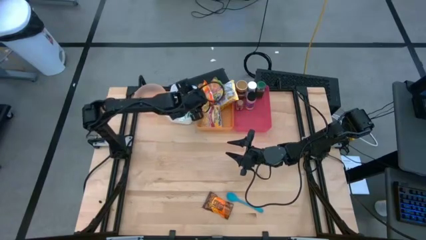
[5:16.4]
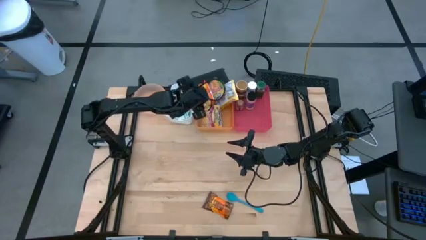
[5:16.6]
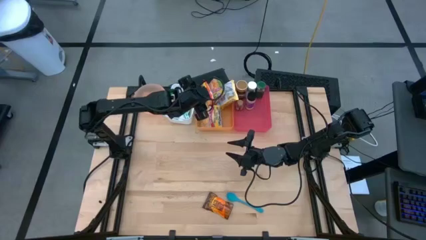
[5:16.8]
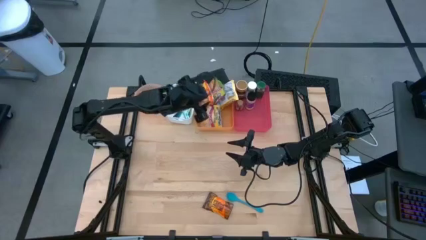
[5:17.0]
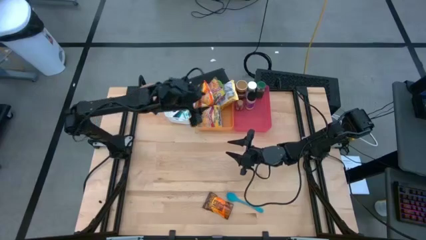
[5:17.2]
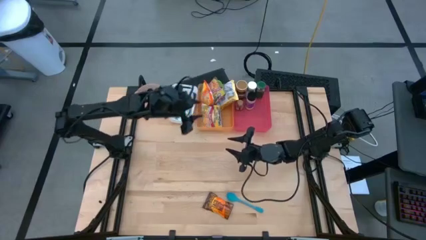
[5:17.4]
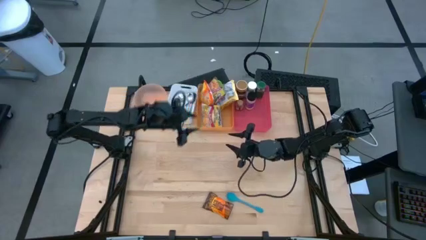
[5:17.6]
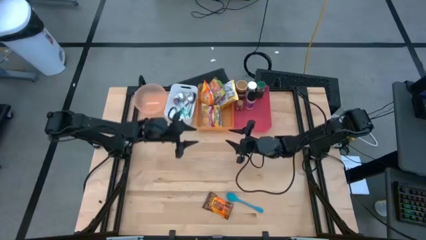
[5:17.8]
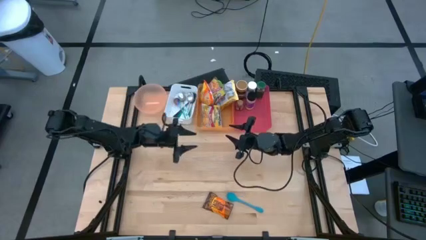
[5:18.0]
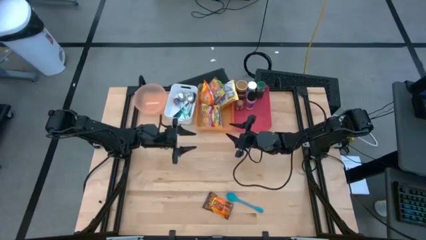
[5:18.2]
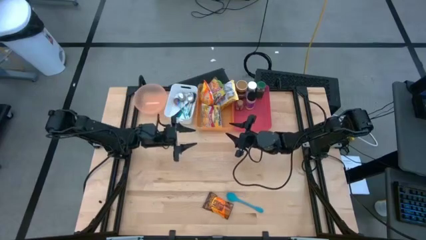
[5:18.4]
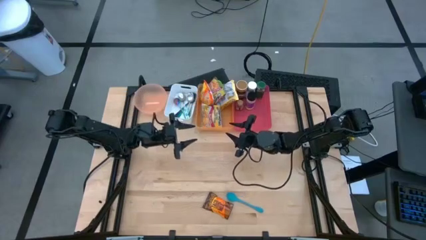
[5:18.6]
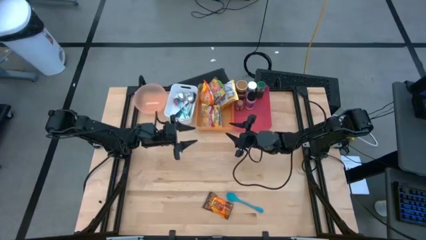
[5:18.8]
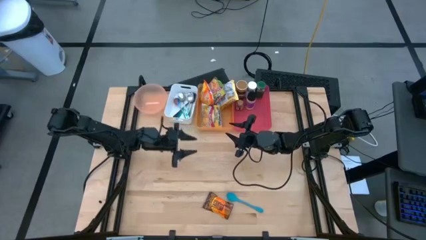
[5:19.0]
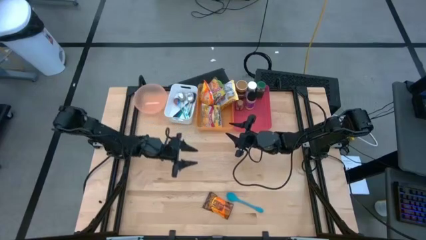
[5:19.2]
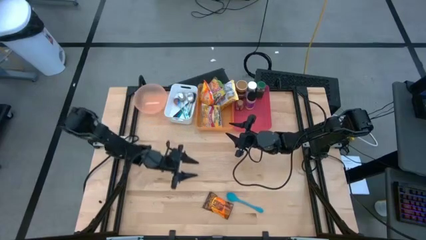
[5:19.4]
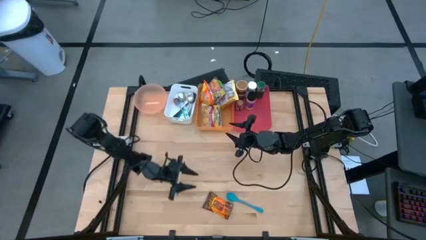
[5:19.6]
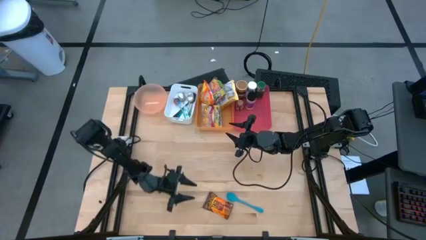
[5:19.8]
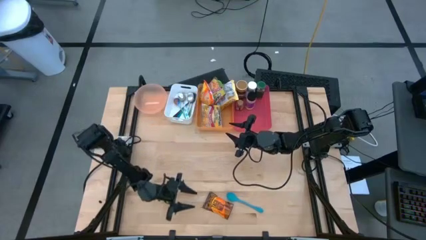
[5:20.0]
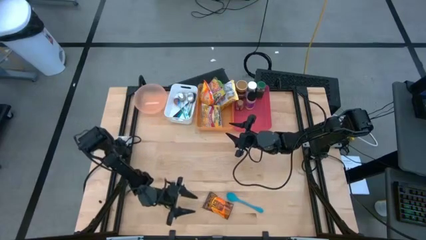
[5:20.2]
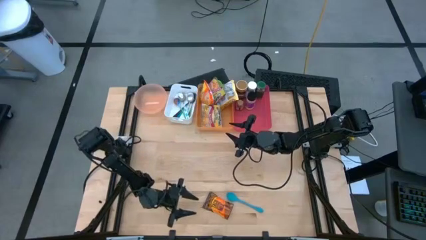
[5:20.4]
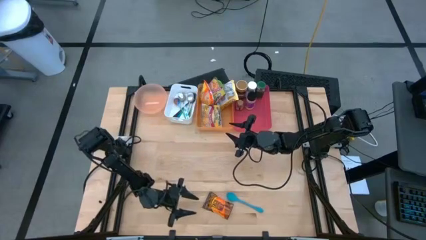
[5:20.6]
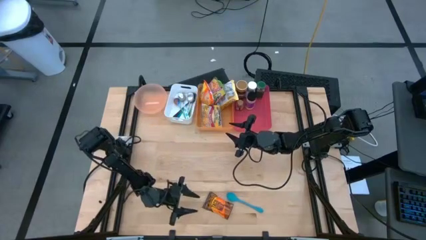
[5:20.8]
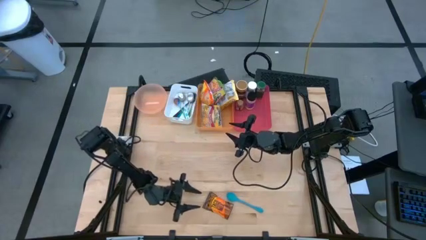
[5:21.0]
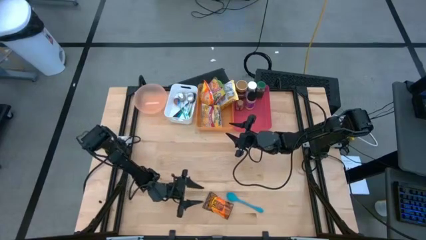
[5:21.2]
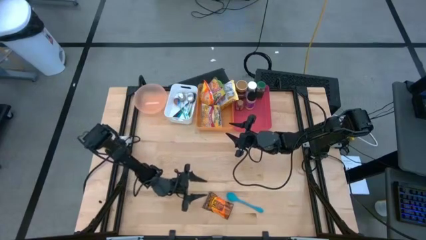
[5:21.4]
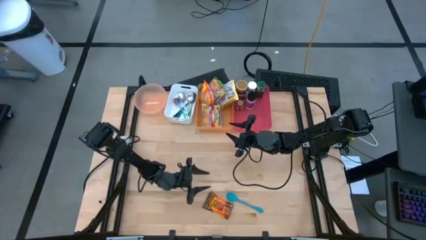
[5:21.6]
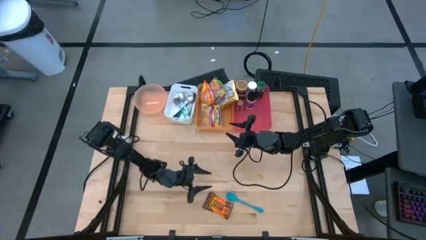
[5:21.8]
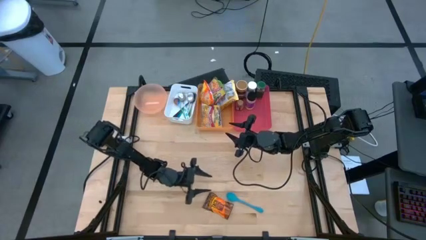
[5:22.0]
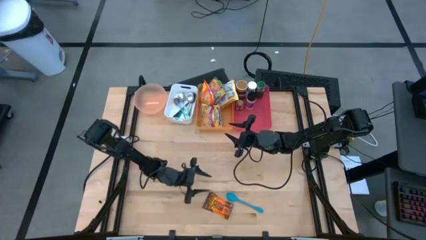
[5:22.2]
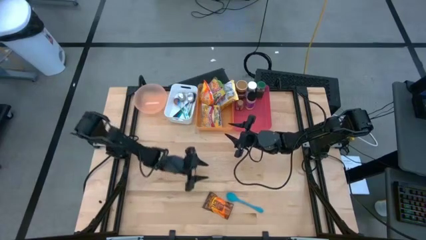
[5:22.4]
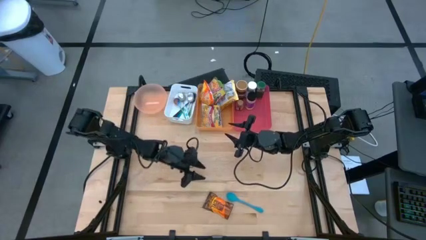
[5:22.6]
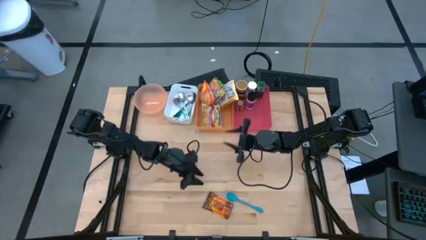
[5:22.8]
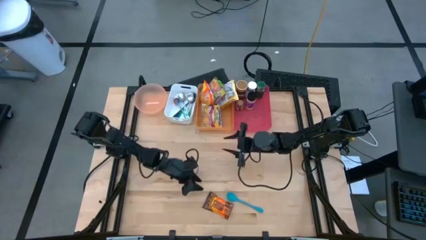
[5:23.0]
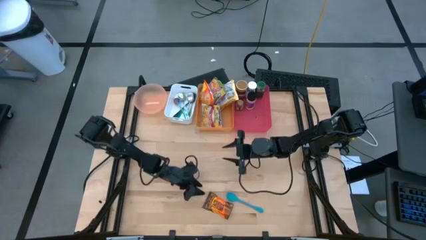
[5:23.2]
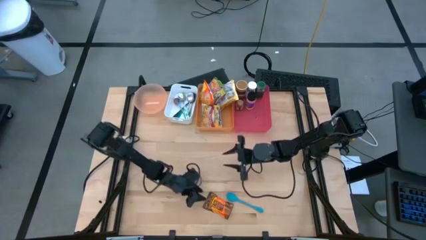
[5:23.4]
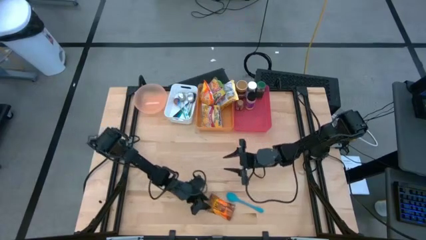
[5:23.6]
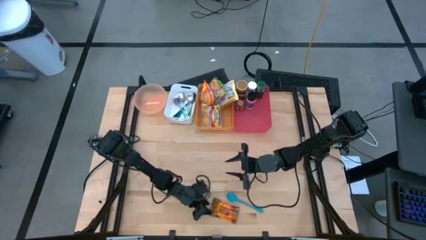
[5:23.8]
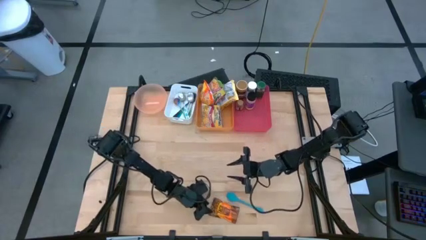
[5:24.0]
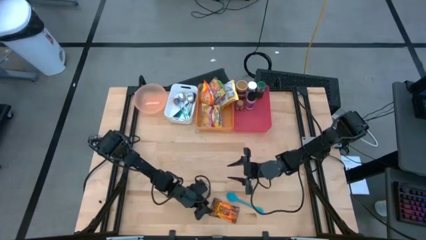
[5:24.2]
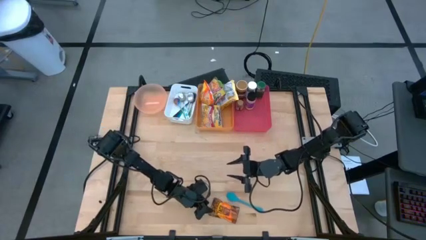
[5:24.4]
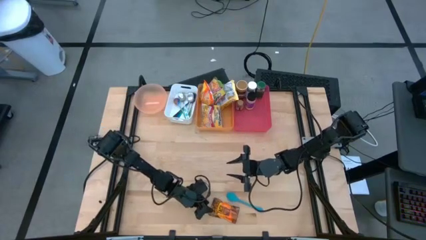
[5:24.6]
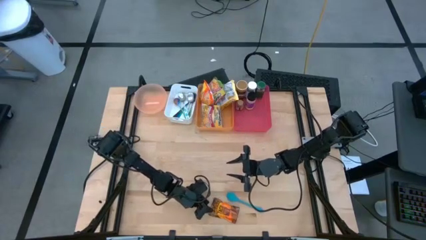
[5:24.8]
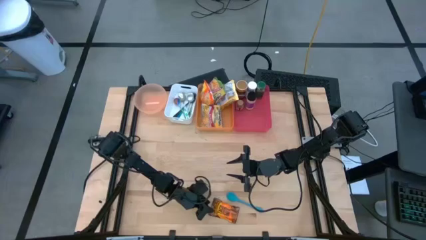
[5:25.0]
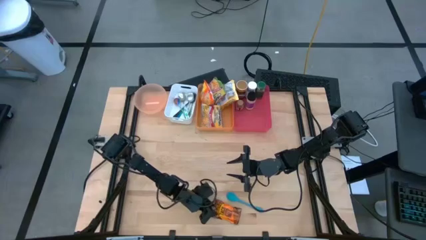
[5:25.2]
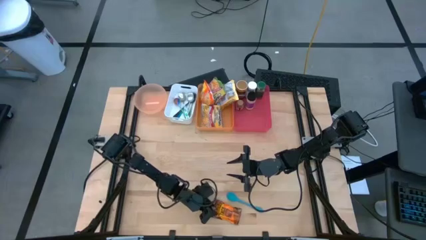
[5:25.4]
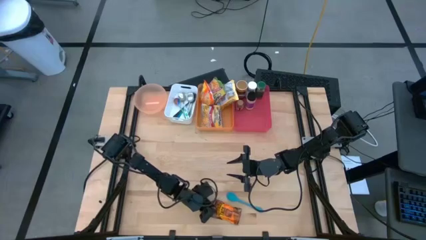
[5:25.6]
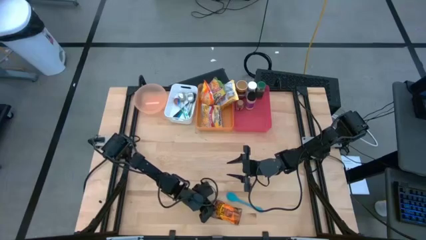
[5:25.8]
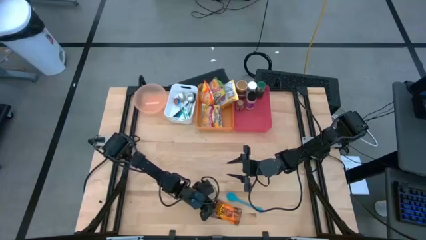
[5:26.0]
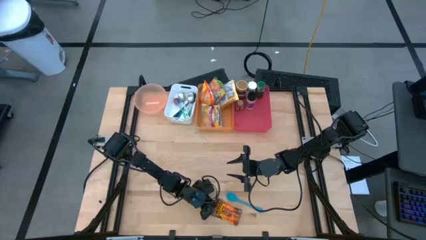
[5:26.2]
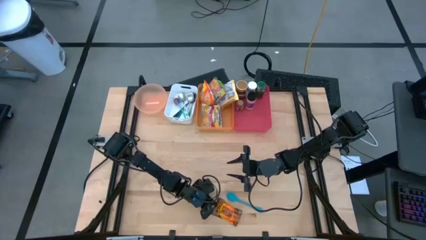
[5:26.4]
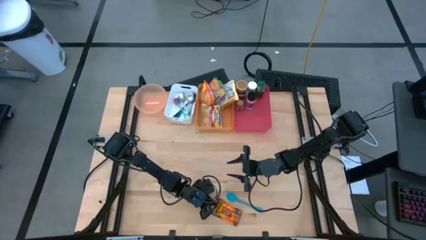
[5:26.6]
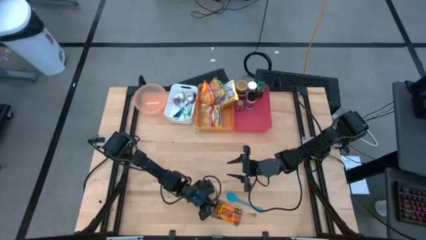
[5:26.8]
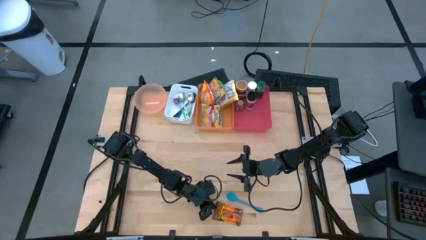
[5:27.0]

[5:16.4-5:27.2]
Task: Pick & Place Food Item
Put the orange seasoning pack into the red bin

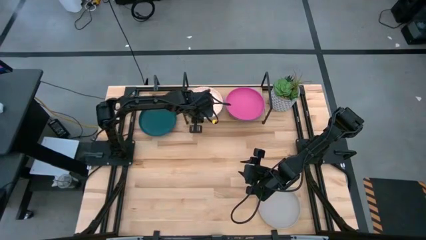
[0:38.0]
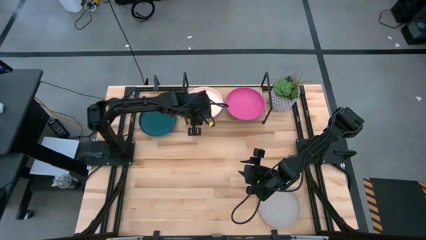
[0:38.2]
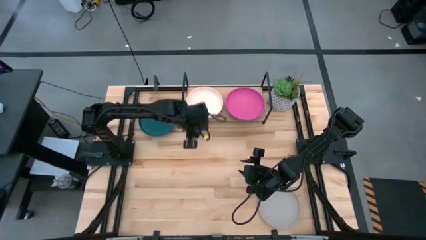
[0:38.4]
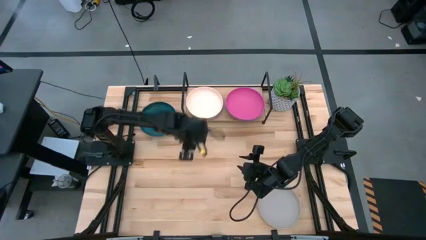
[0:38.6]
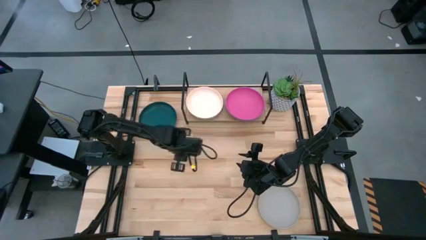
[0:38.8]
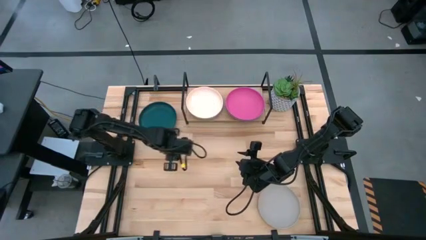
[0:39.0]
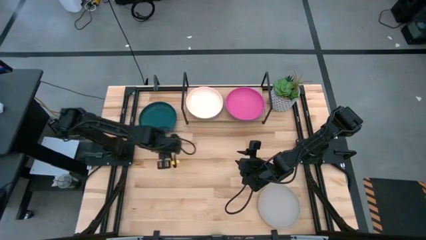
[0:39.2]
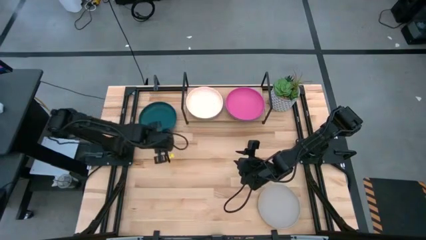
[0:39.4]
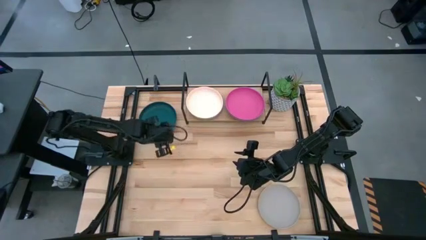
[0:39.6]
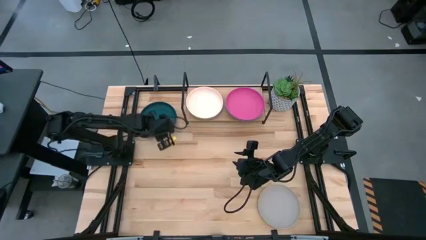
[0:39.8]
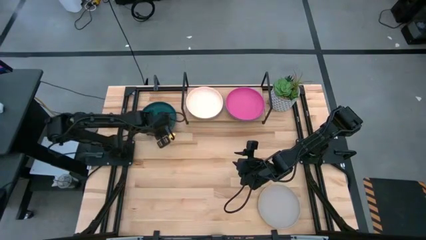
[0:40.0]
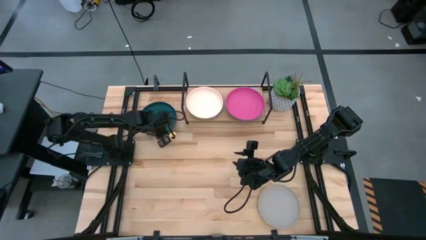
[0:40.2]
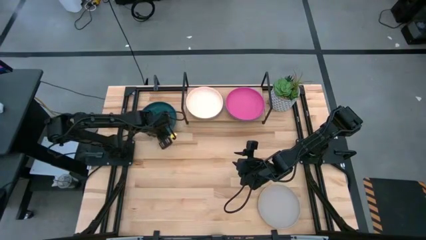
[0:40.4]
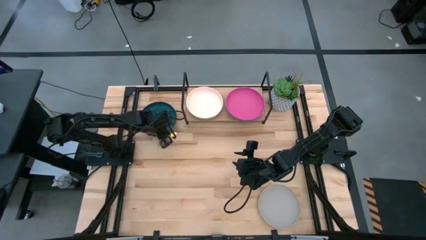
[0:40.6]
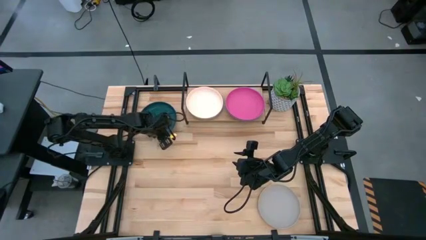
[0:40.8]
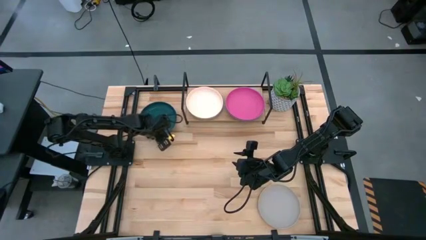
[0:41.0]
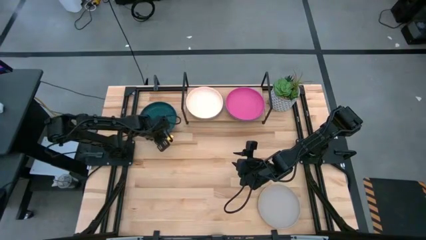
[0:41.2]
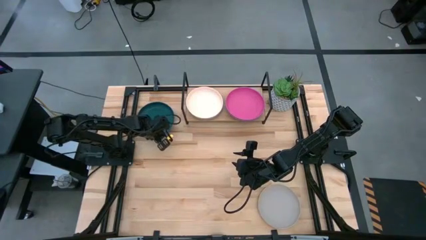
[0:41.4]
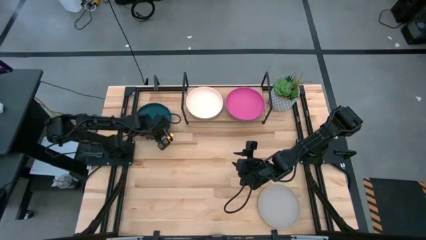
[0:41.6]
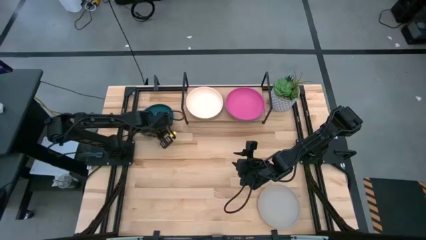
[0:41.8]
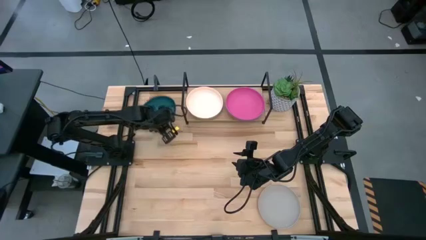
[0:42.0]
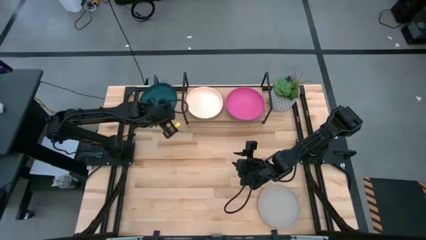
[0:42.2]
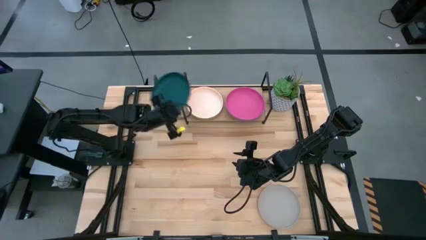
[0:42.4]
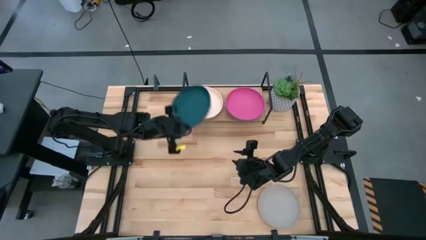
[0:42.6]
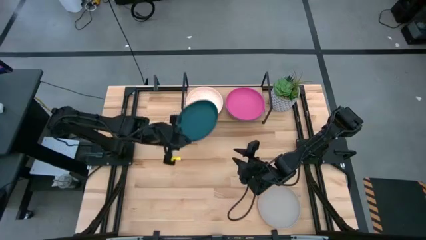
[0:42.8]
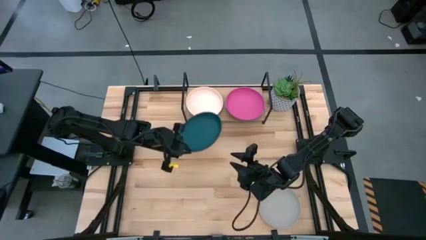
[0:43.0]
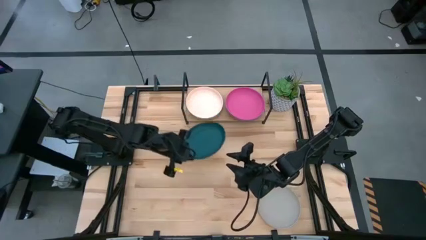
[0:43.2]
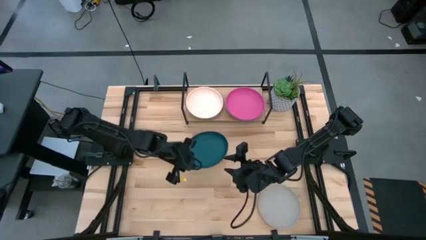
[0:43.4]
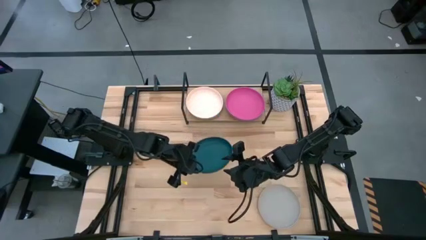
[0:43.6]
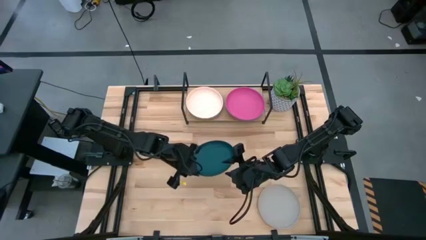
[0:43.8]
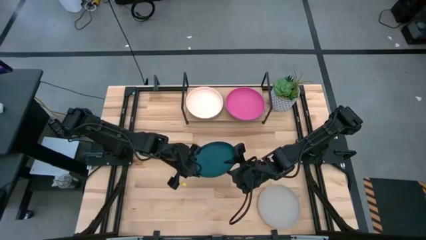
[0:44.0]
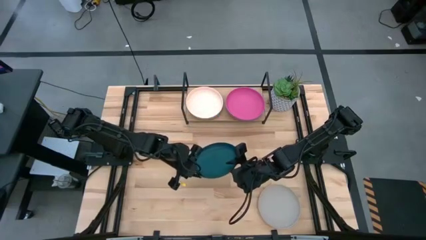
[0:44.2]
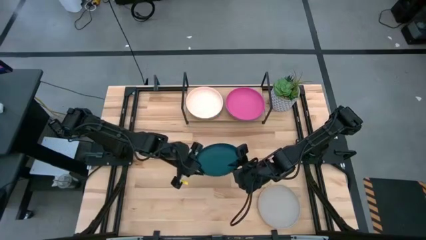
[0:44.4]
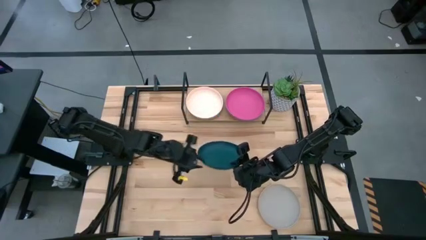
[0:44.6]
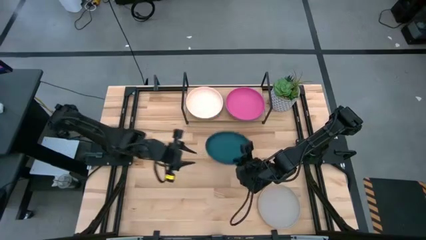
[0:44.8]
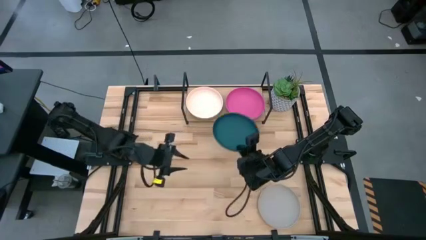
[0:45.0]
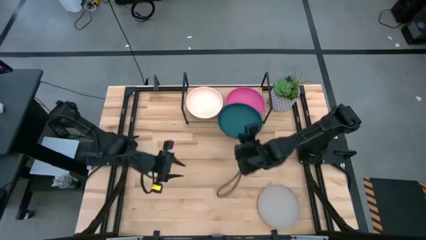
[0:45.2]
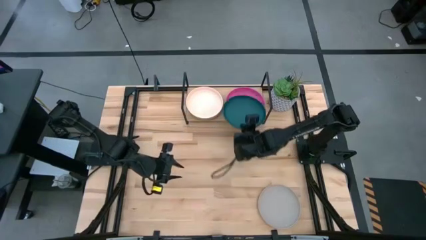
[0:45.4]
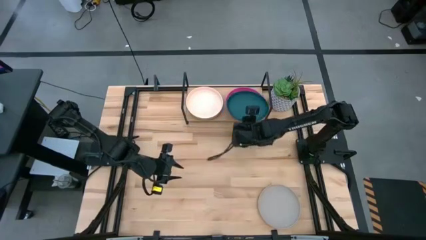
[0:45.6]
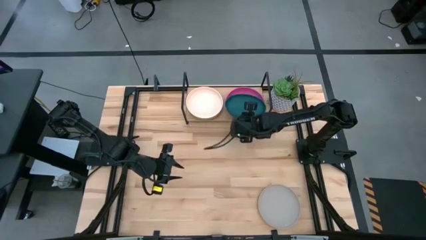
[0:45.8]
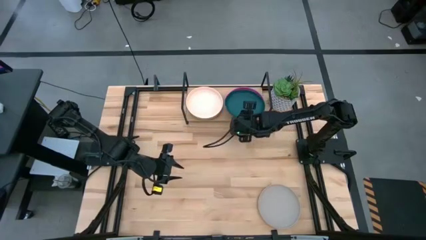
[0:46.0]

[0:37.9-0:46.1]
Task: Place and stack plates onto a shelf
Stack the dark green plate on top of the pink plate on the shelf
